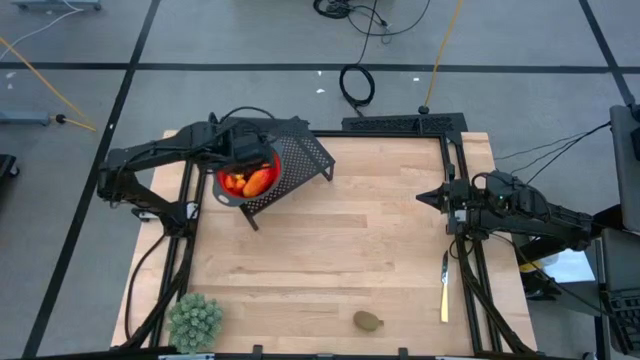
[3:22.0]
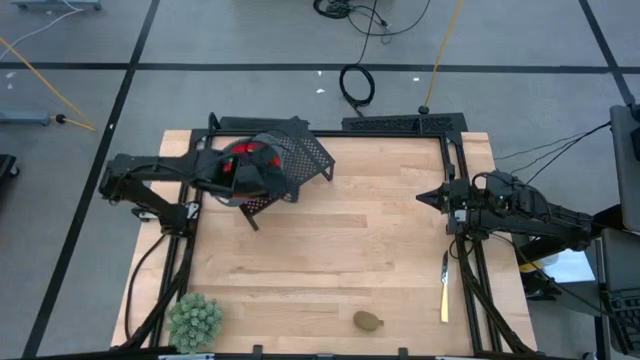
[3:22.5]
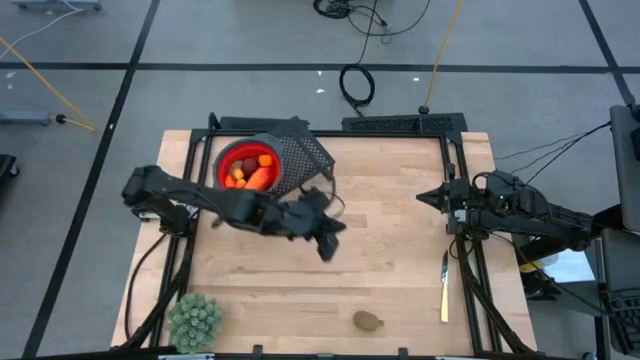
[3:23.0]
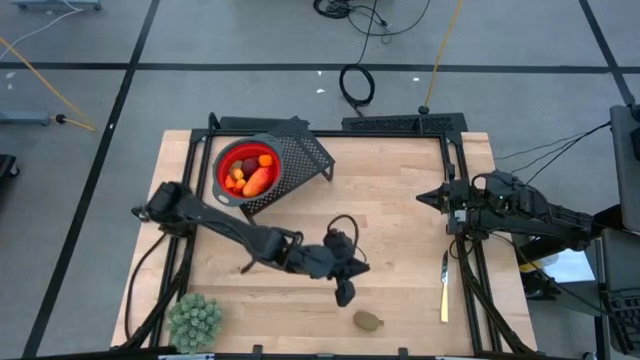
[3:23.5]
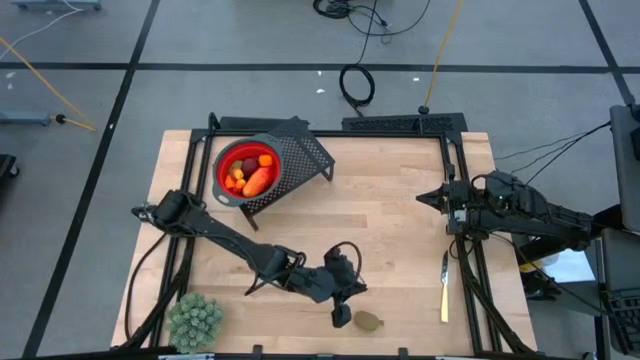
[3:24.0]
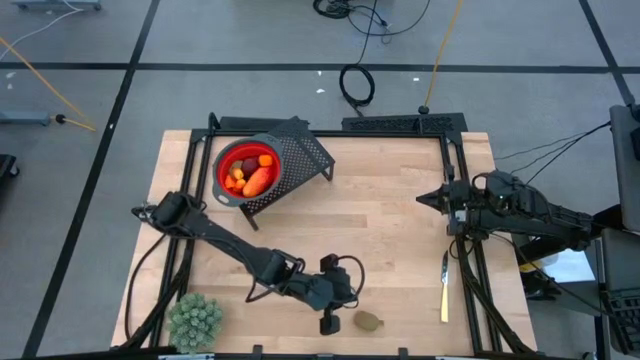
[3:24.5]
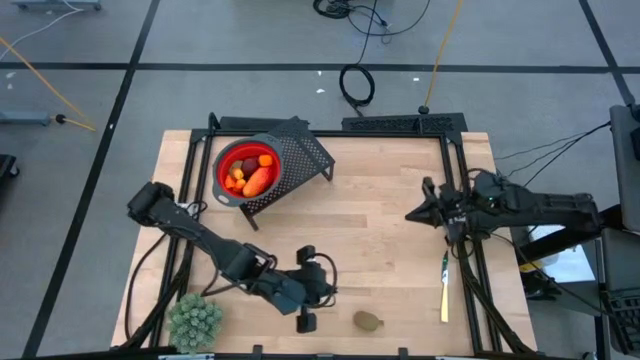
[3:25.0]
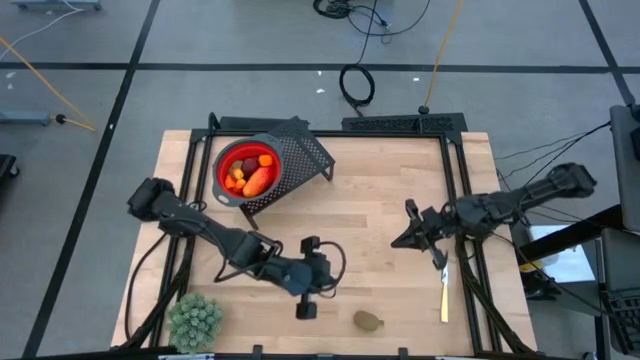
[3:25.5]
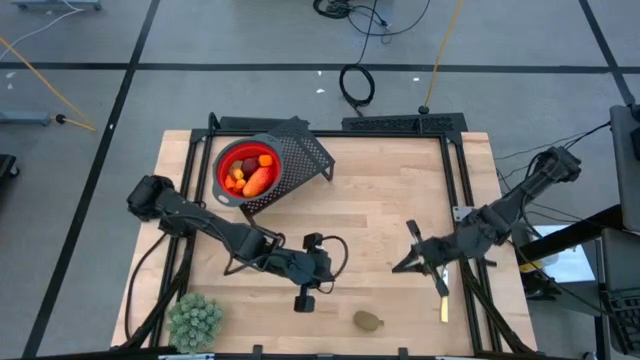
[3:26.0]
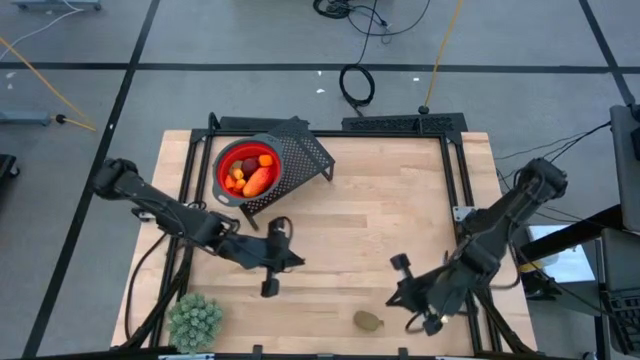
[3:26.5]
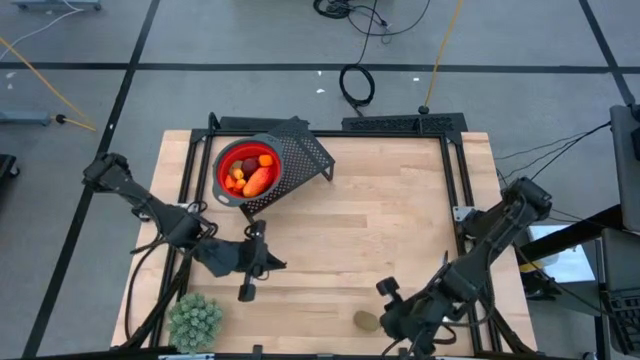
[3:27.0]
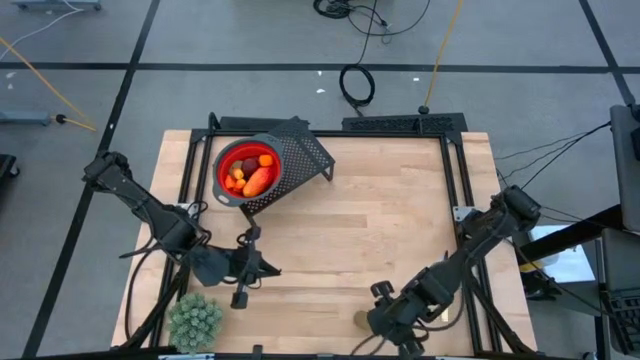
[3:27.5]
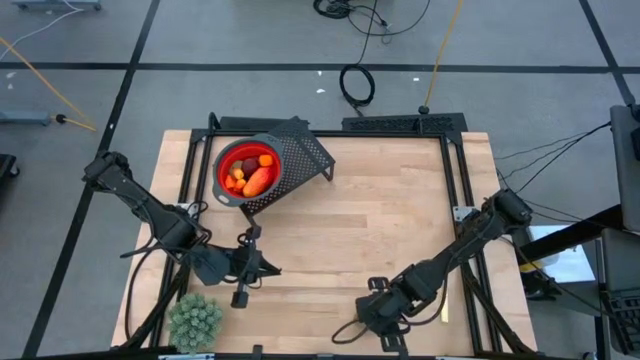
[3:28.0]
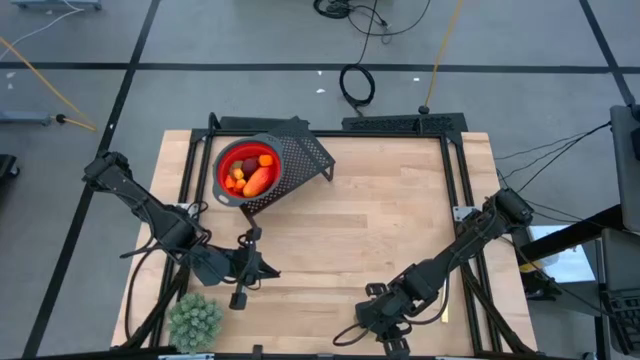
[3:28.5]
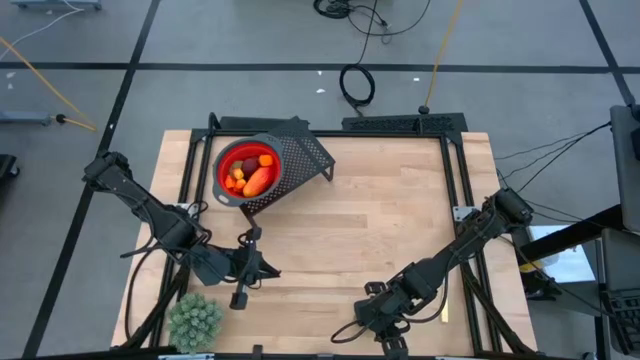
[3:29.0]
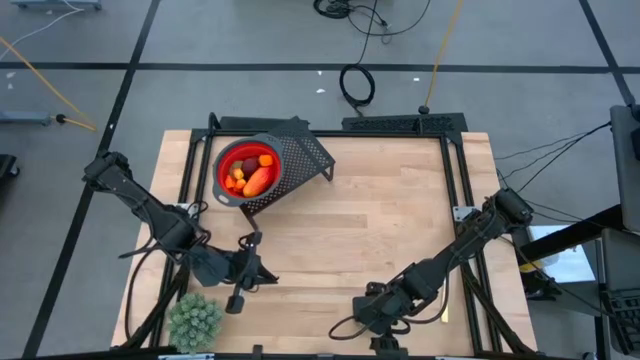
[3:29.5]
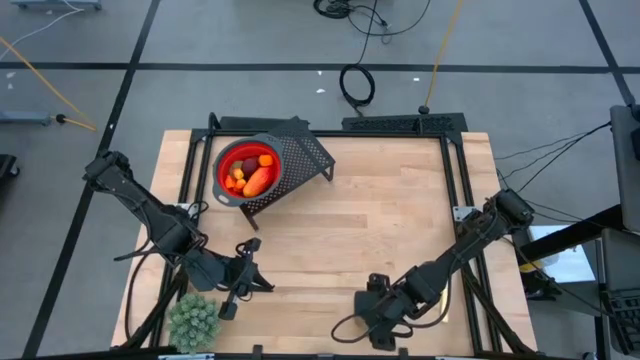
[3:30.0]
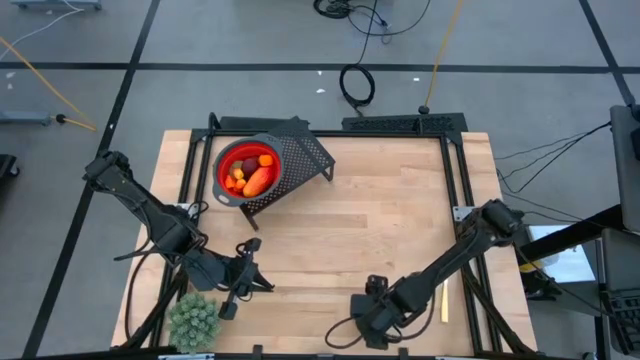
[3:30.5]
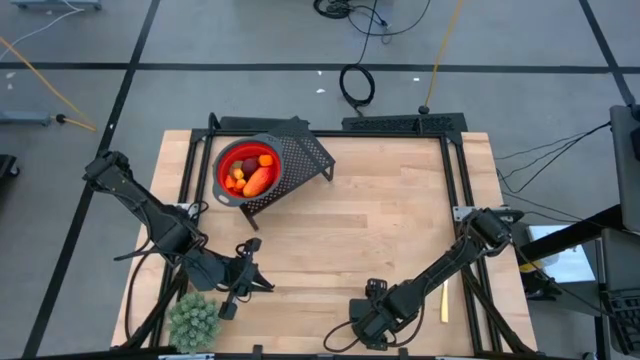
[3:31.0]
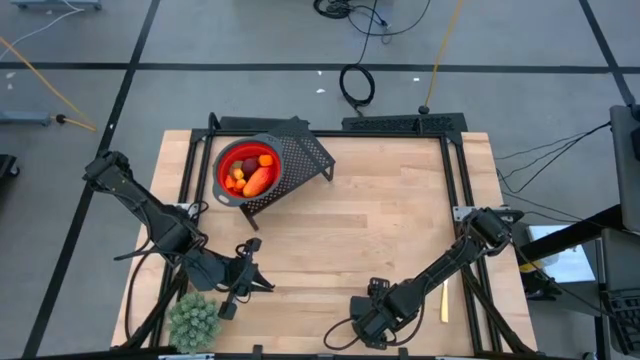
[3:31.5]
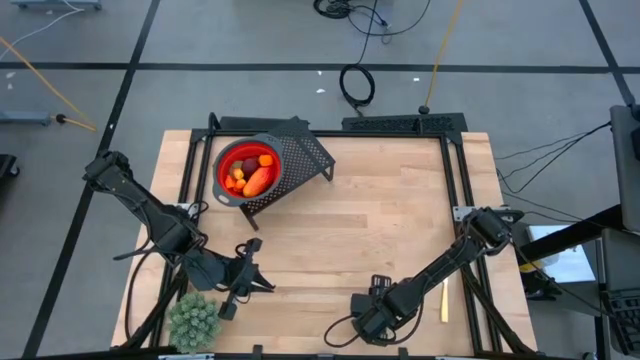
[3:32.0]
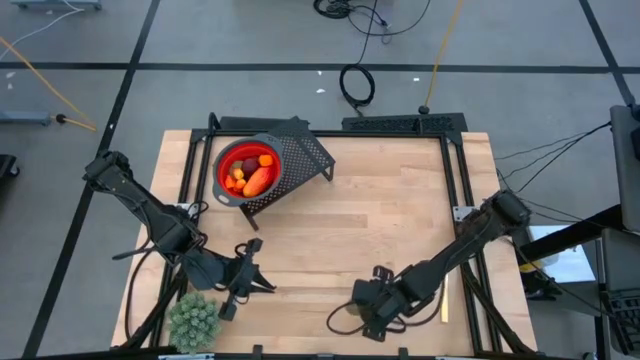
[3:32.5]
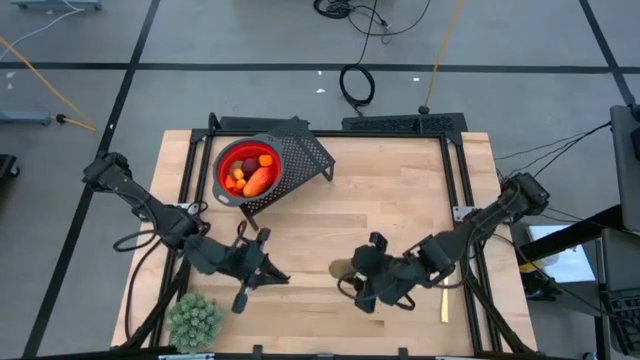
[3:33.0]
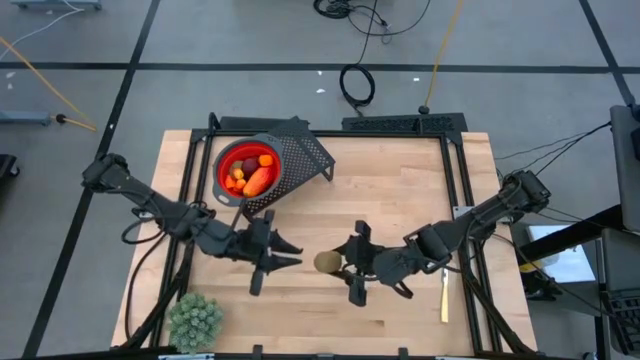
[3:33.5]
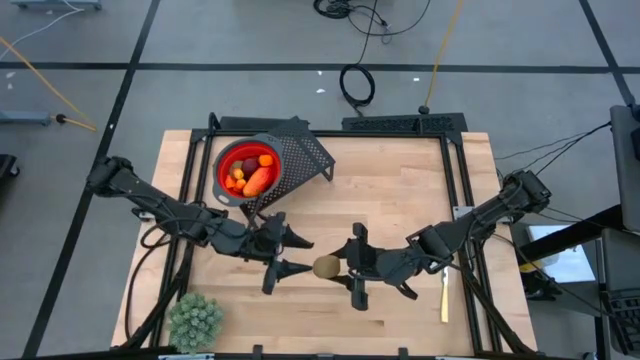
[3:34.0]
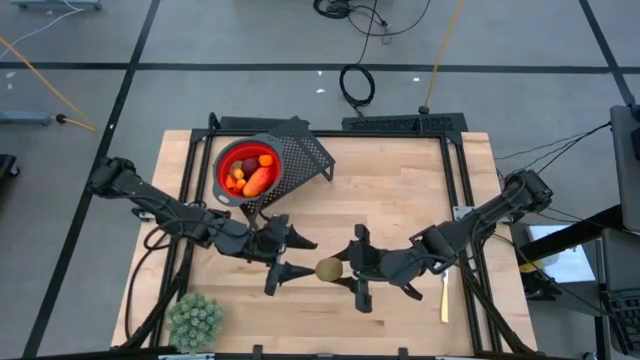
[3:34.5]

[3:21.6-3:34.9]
Task: Pick & Place Fruit
Put the kiwi into the red strainer bowl on the shelf

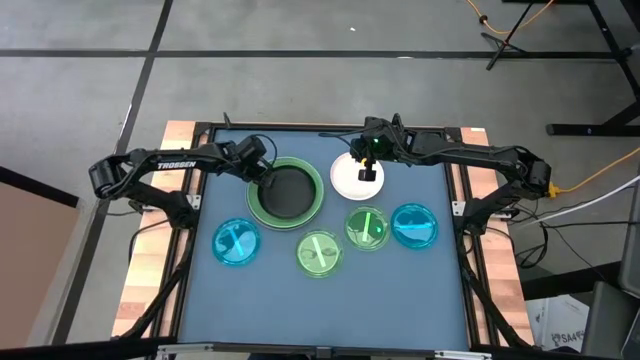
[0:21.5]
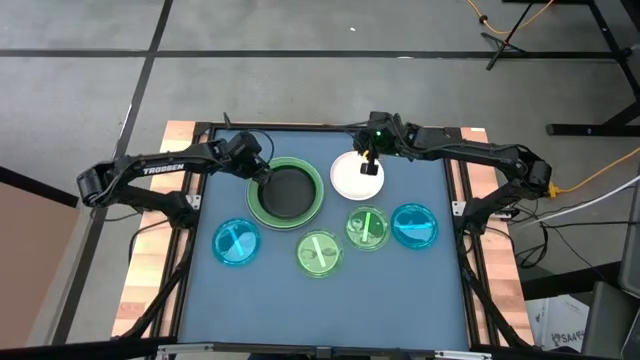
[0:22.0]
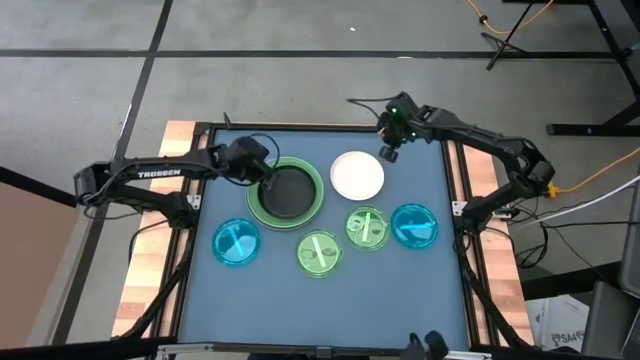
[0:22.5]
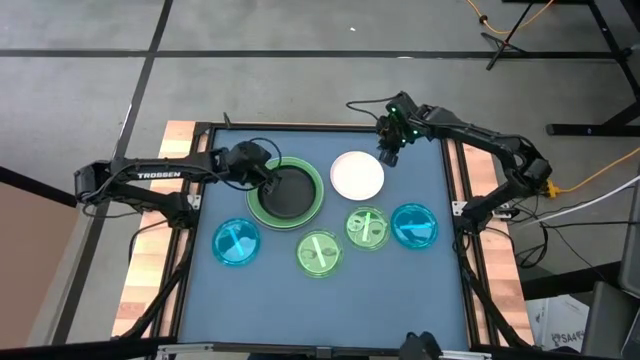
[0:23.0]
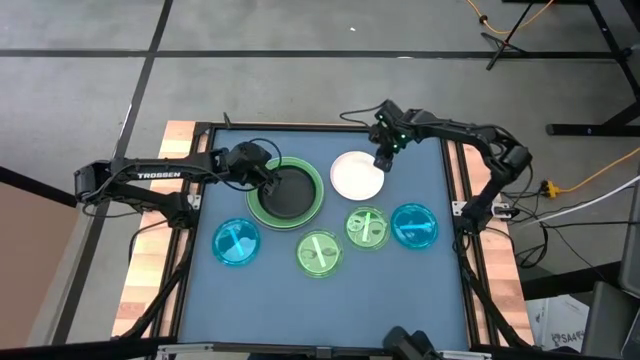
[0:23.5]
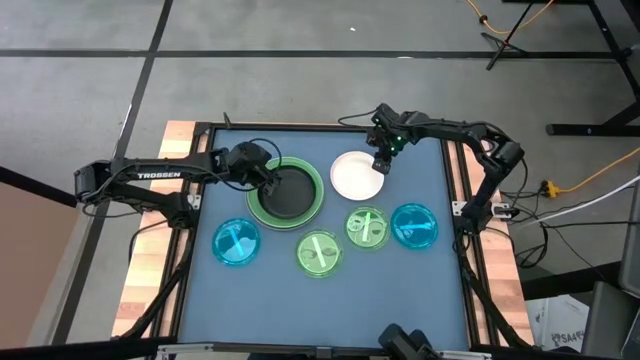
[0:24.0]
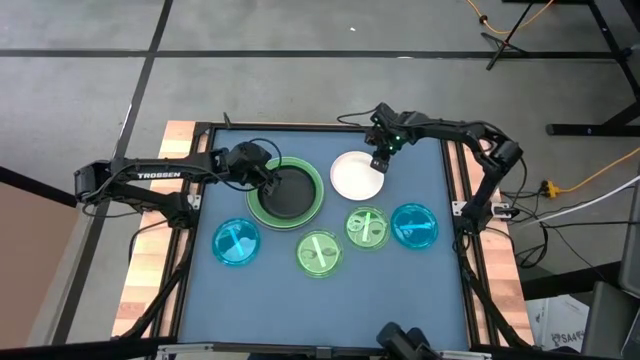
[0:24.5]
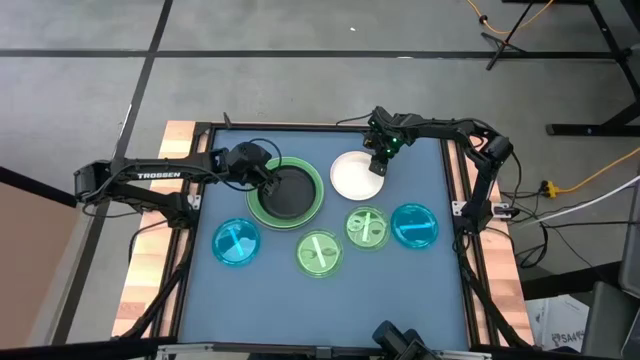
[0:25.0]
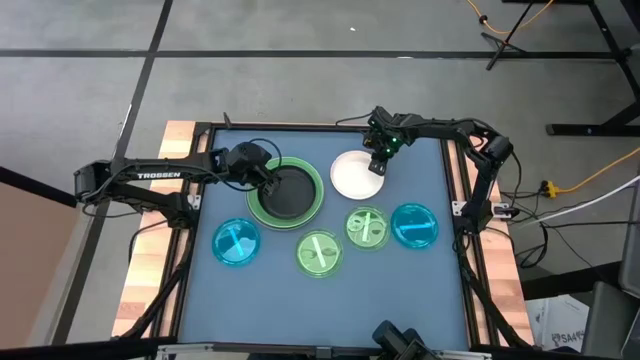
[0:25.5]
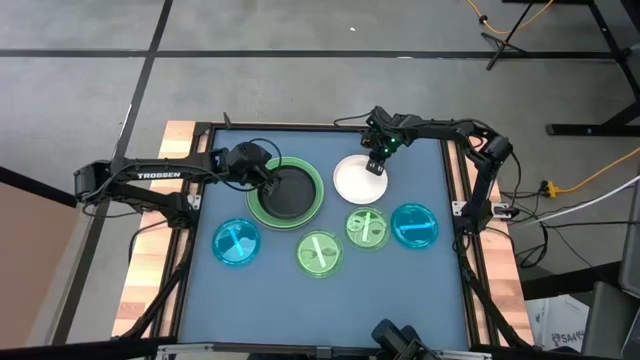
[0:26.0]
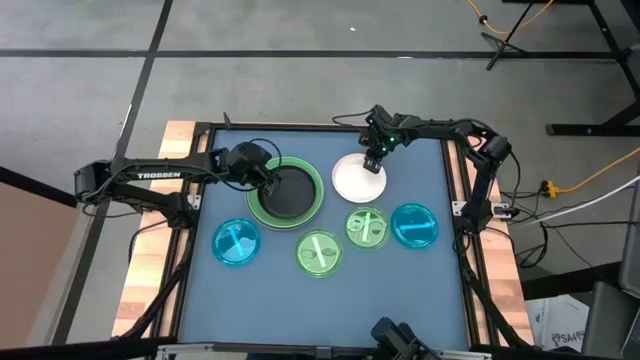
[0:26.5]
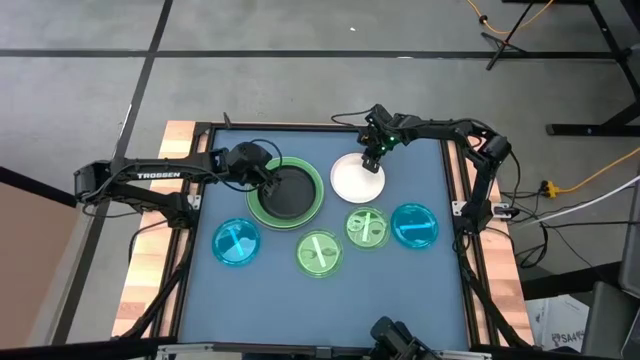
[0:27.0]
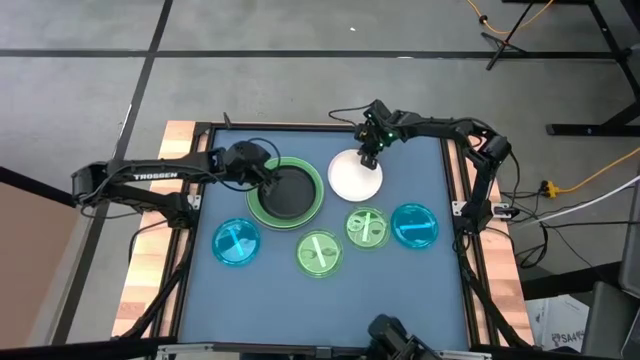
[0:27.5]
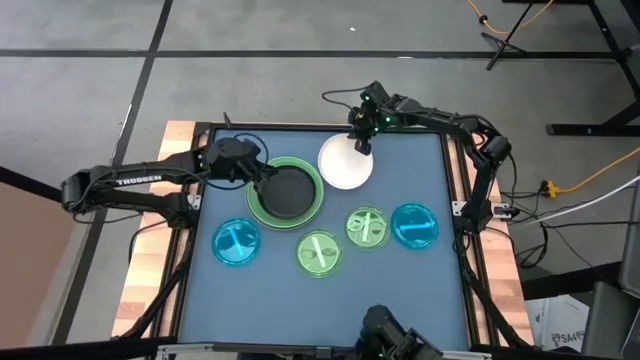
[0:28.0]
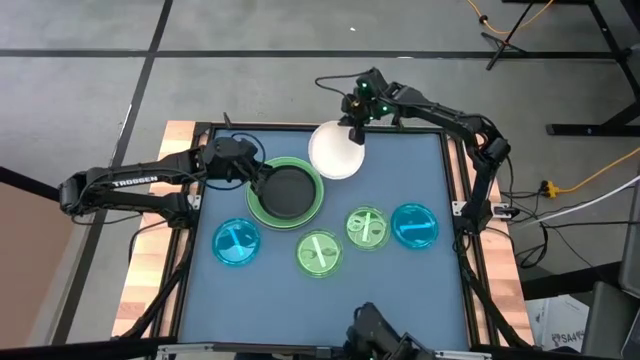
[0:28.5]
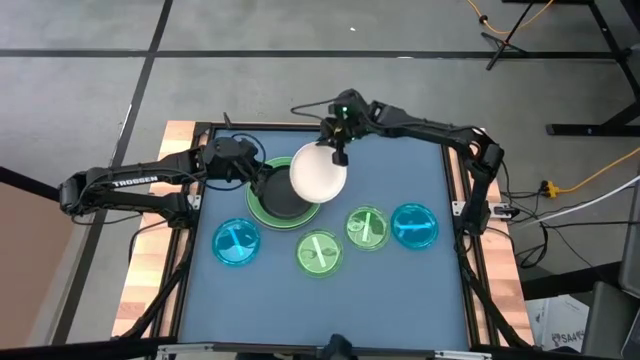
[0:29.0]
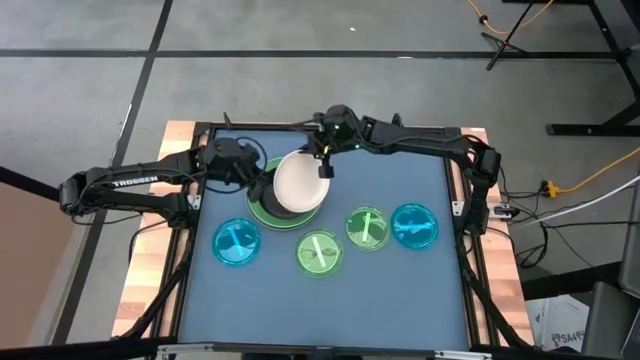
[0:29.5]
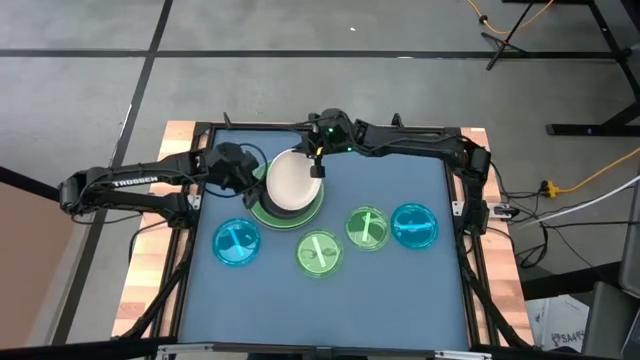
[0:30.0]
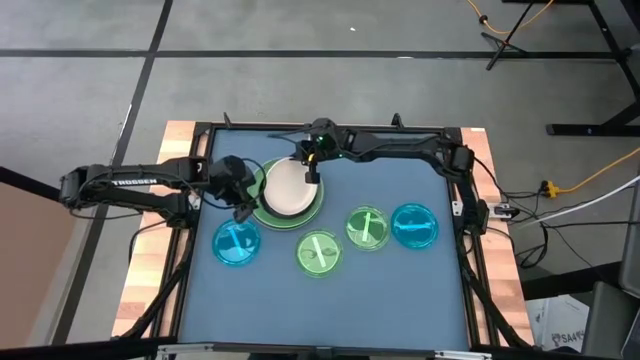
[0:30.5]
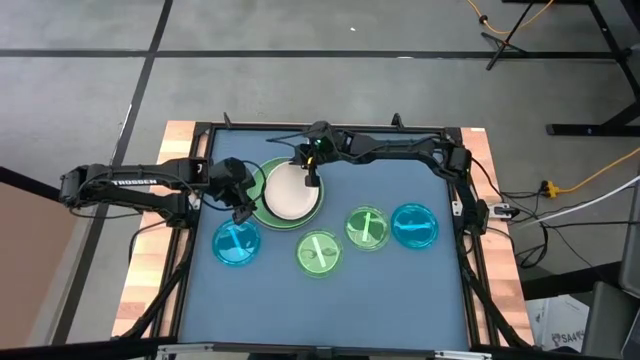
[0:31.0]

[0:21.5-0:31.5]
Task: Stack plastic plates
Stack the white plate on top of the black plate
